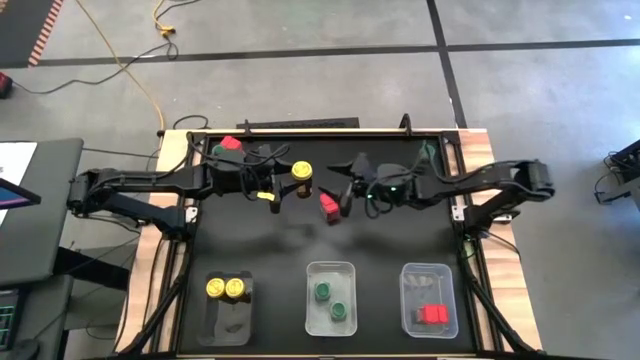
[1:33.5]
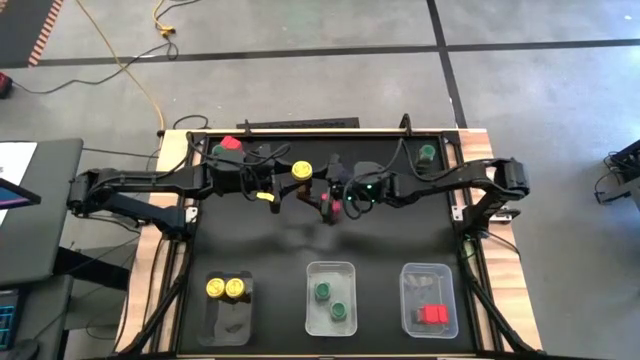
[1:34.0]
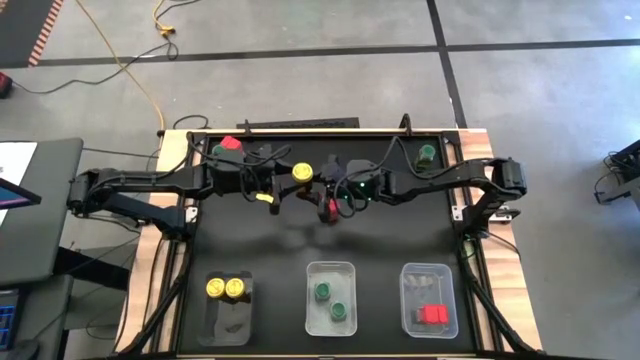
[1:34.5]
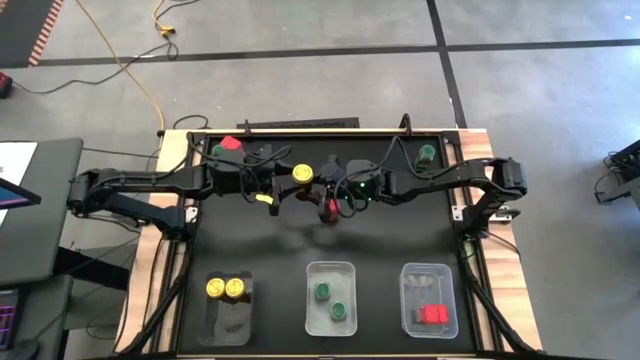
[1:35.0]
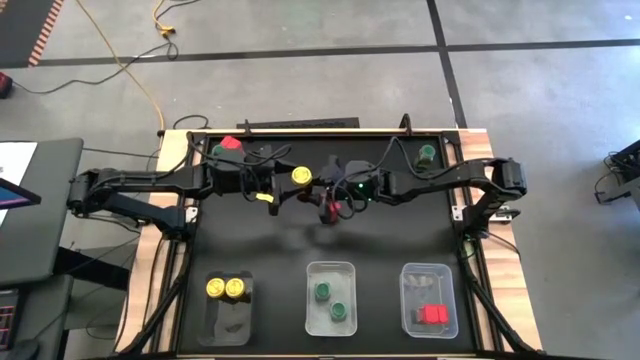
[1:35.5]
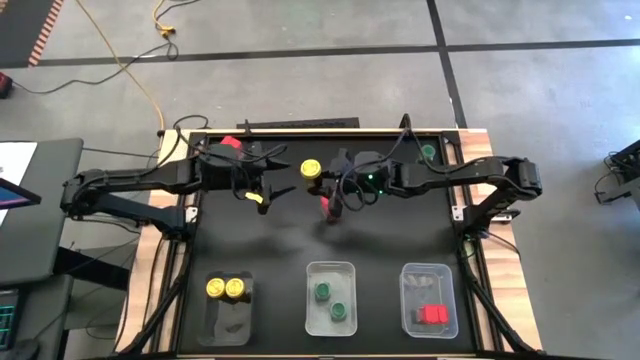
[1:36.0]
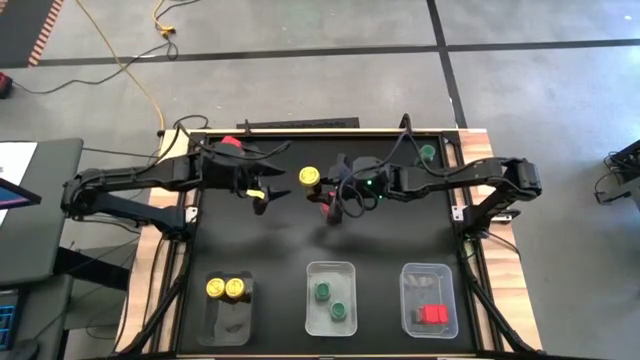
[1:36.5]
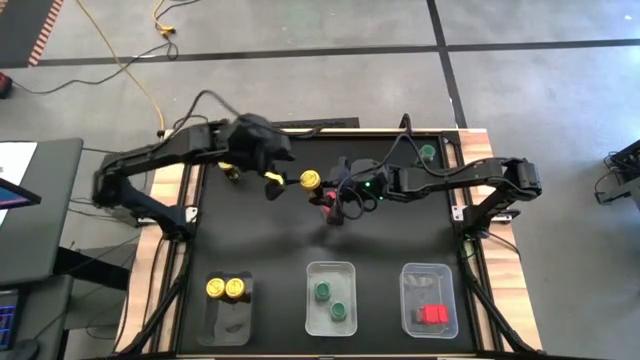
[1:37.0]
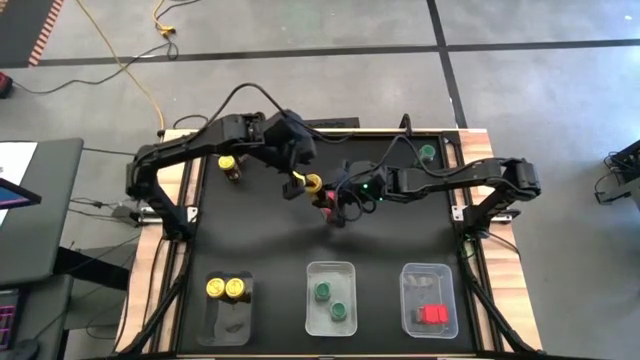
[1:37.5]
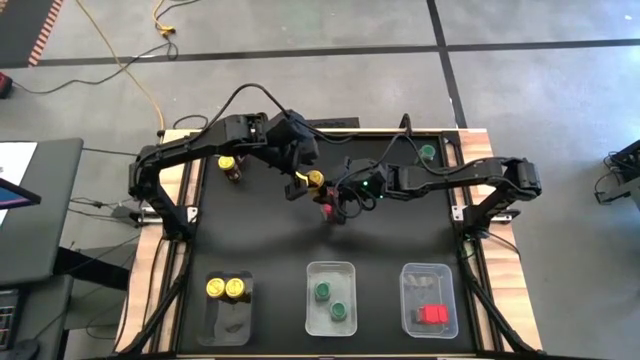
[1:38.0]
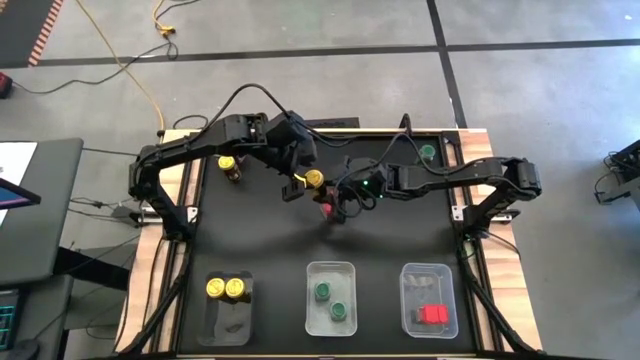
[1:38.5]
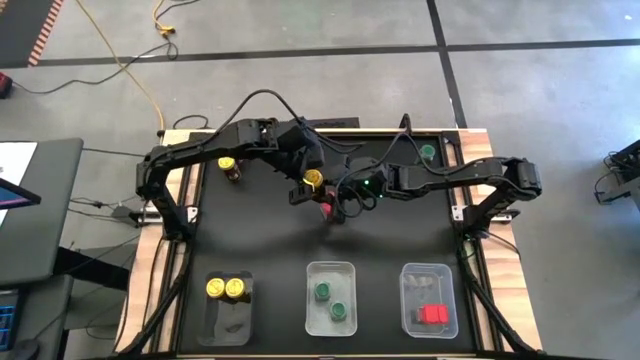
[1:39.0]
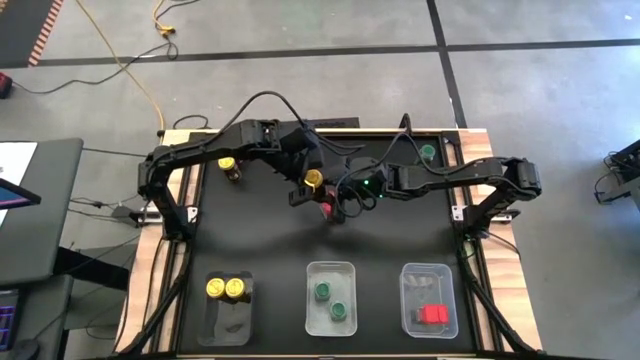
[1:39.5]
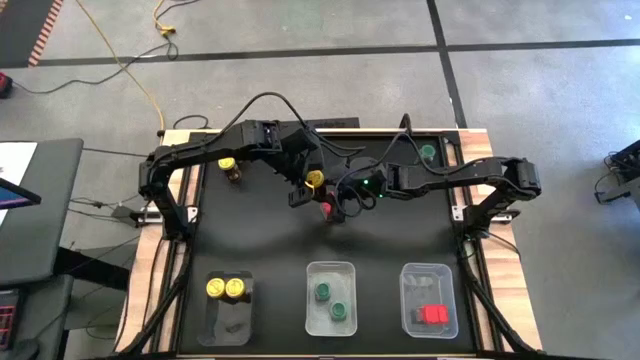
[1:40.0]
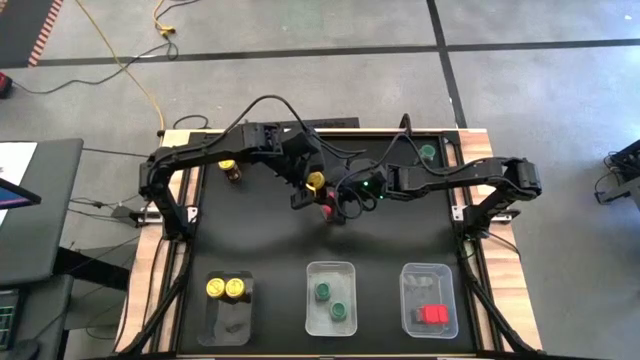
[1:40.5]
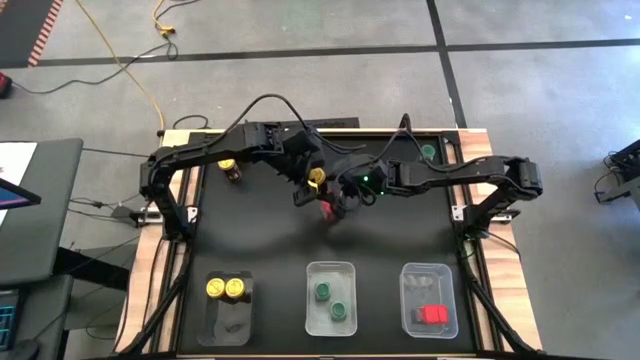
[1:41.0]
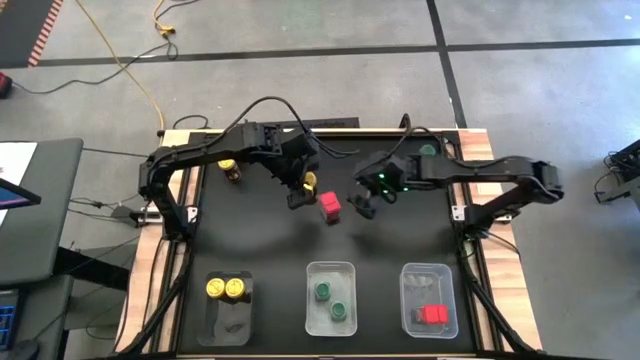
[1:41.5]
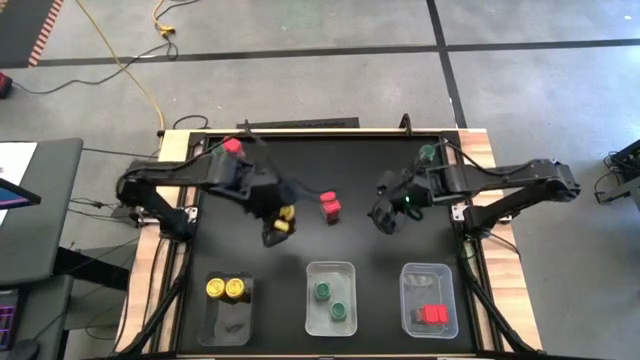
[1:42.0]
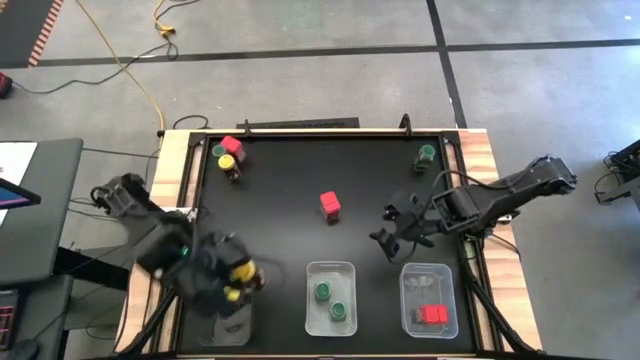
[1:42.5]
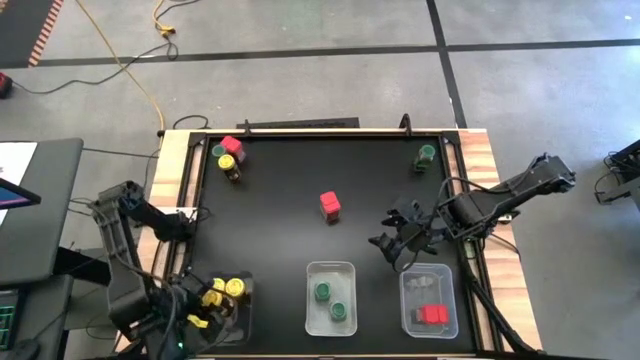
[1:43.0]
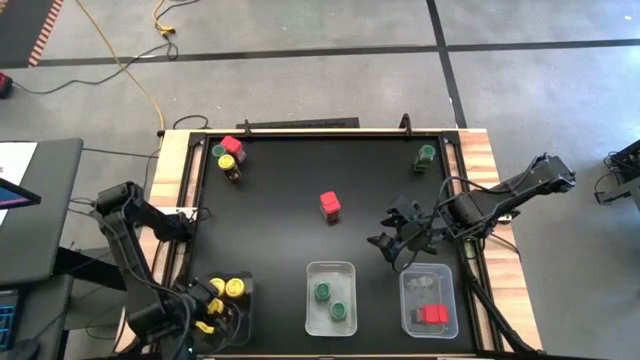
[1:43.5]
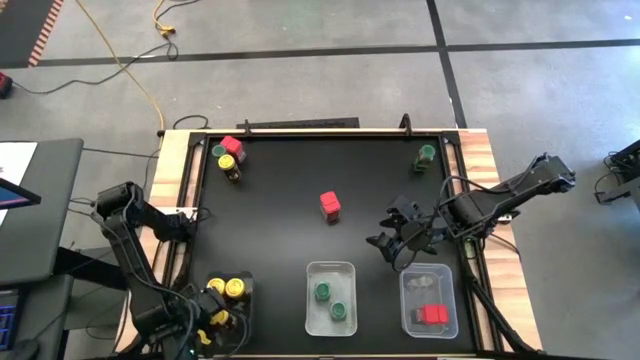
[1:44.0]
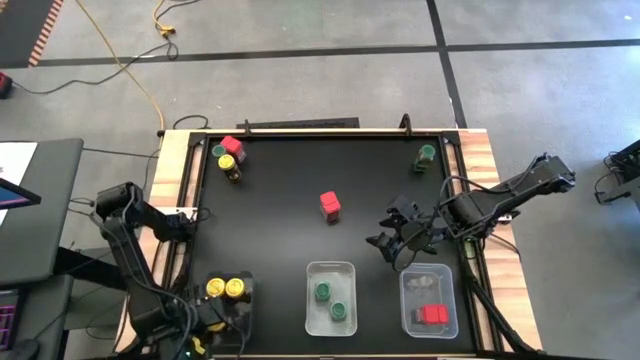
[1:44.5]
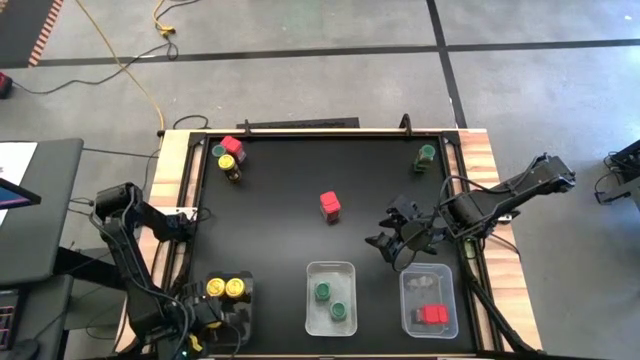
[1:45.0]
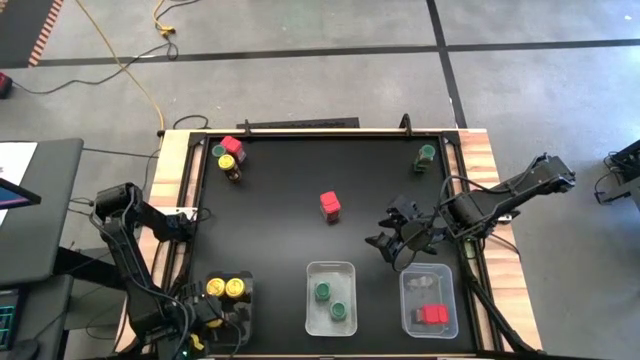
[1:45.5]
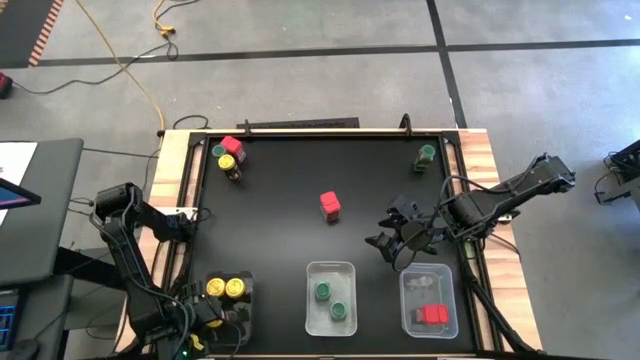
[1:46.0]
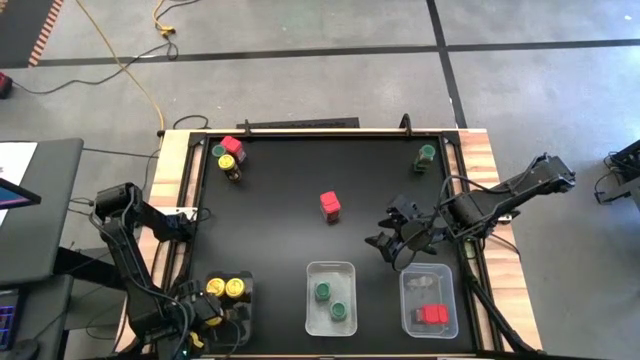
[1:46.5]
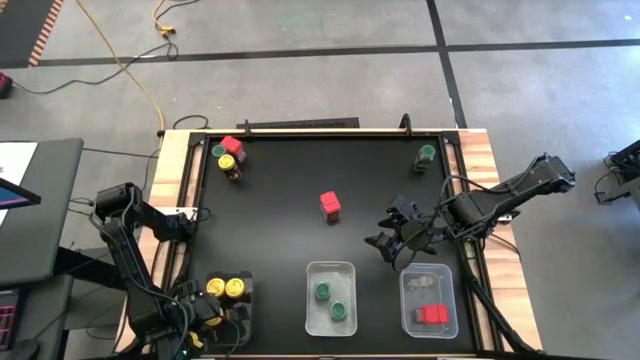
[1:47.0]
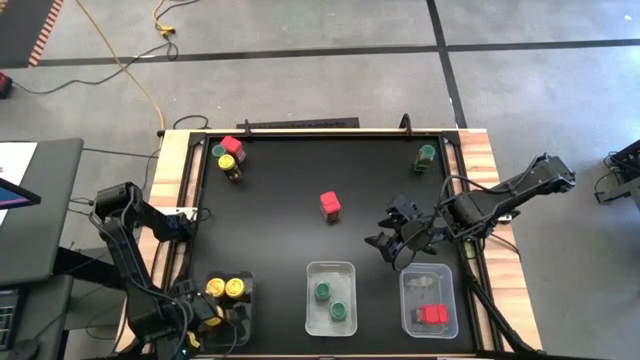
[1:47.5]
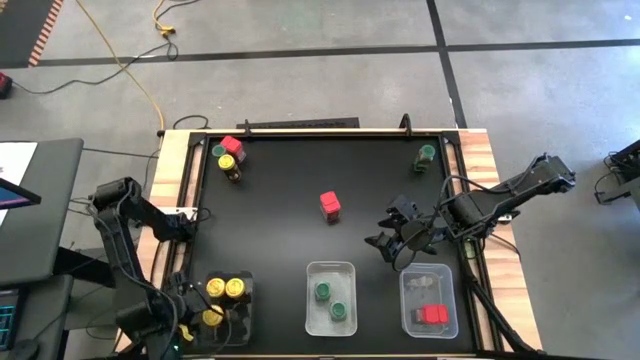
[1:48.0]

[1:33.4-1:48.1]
Task: Sort spices by type
Put the right yellow seasoning bottle into the black bin

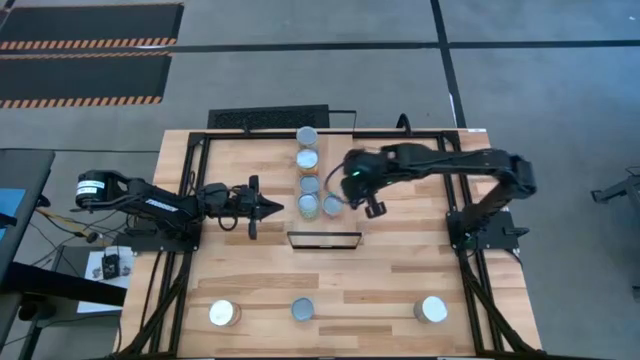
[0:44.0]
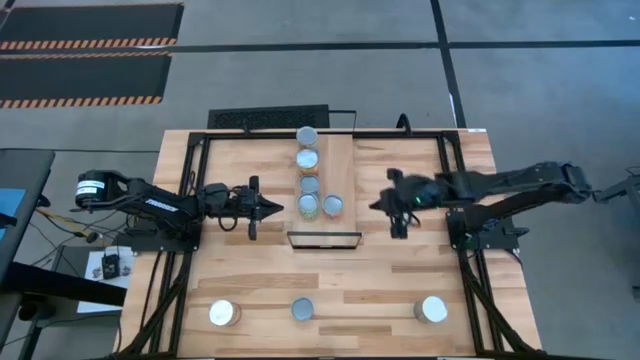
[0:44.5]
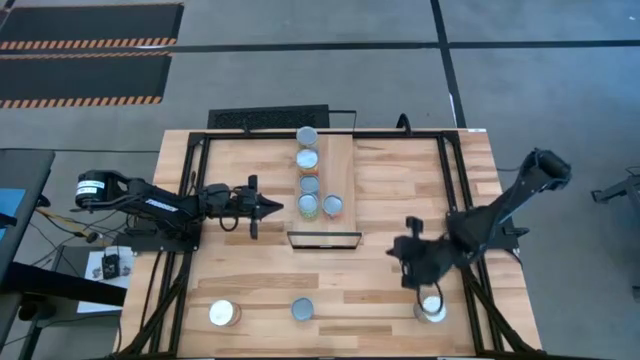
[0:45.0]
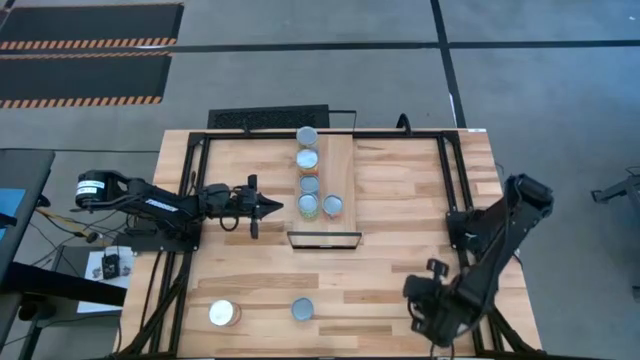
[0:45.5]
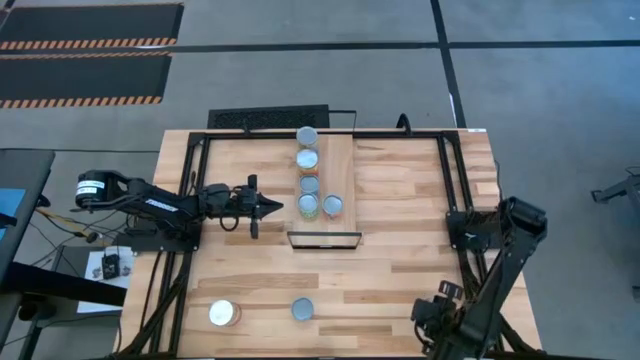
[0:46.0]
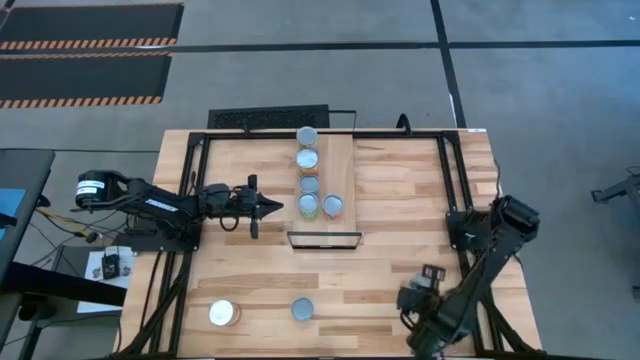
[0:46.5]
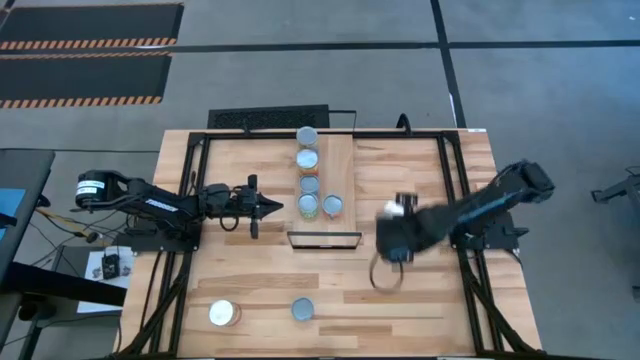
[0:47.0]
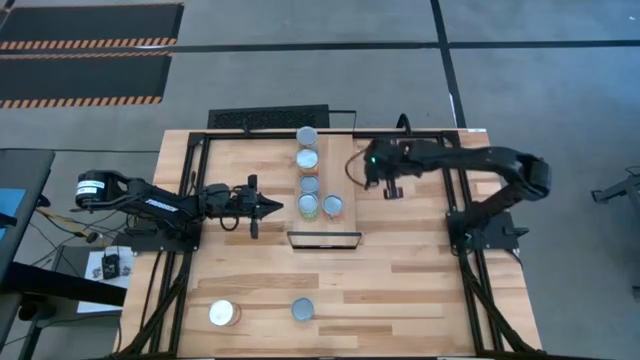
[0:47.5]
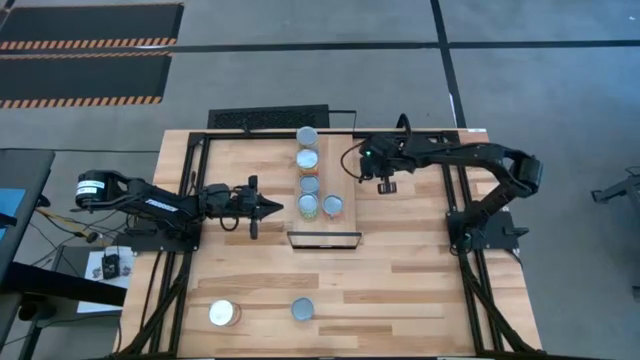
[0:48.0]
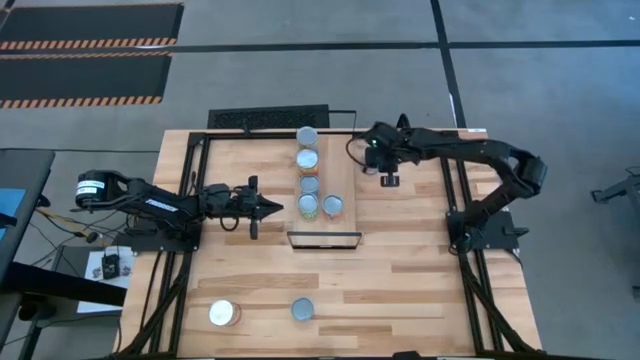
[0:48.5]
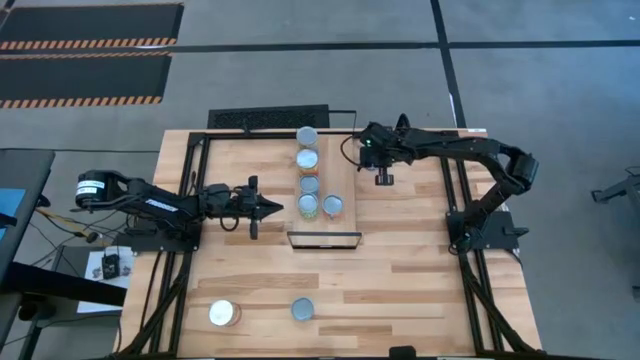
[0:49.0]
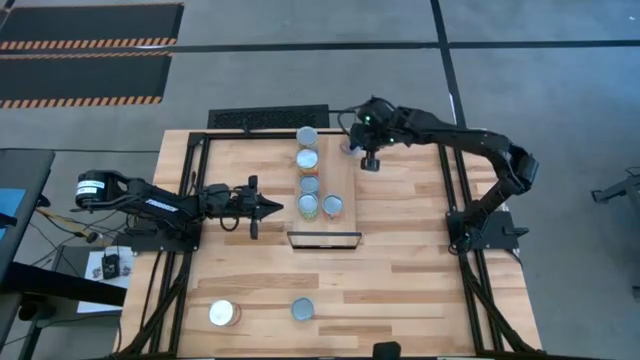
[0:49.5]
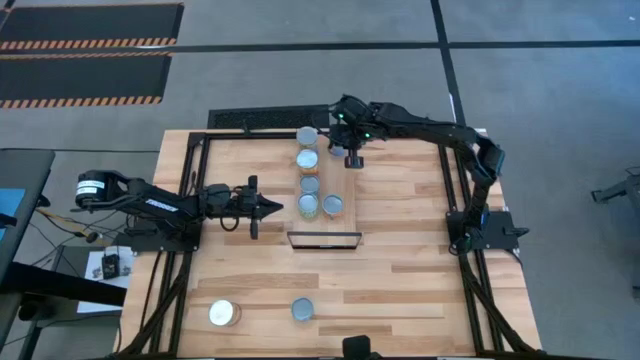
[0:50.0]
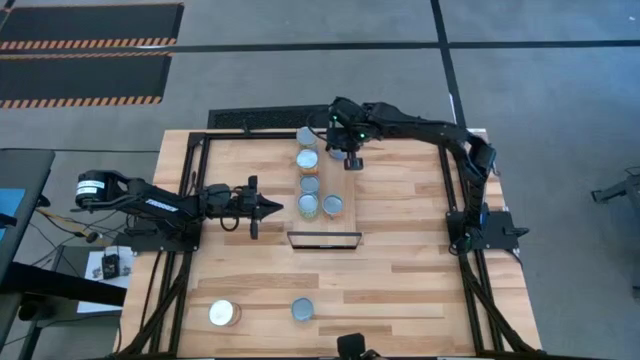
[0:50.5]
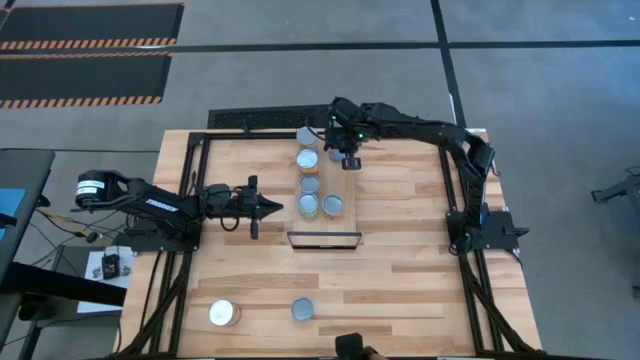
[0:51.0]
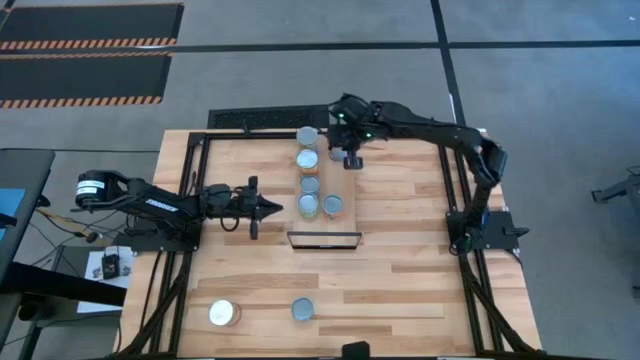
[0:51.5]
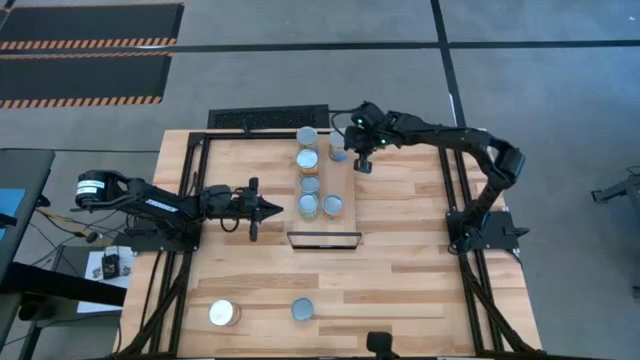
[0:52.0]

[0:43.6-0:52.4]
Task: Pick and place cans onto a shelf
Put the canned peaches on the shelf aligned with the other canned peaches
